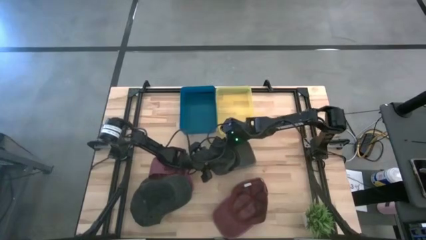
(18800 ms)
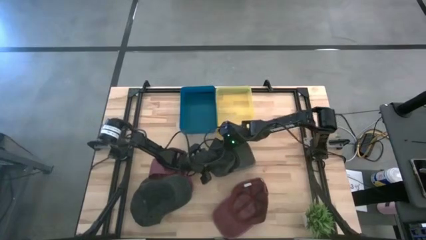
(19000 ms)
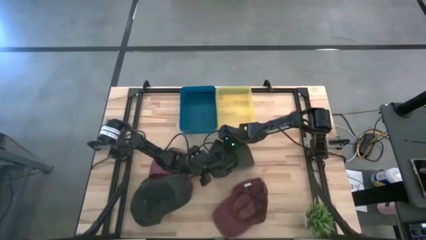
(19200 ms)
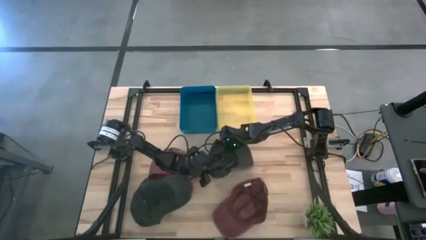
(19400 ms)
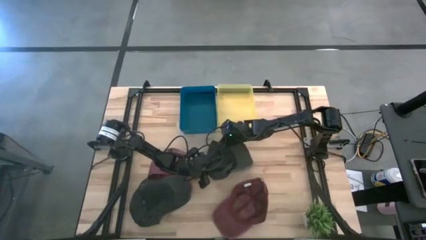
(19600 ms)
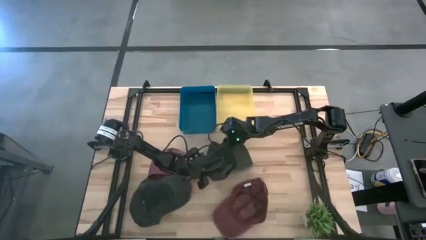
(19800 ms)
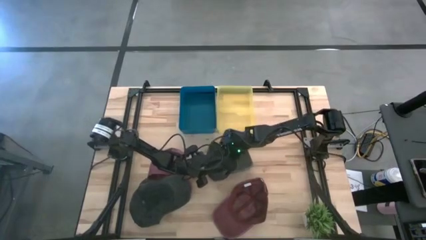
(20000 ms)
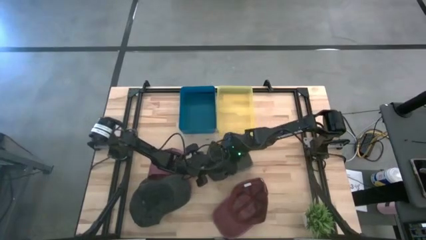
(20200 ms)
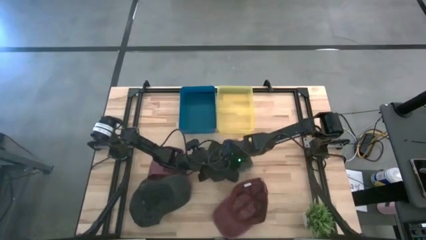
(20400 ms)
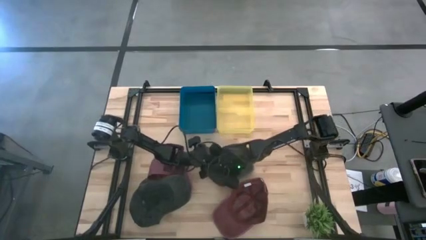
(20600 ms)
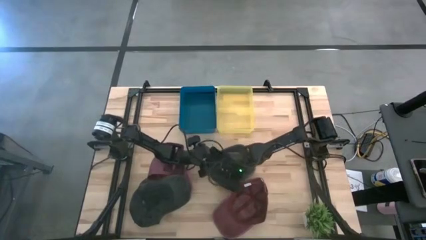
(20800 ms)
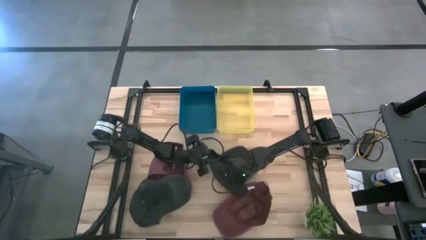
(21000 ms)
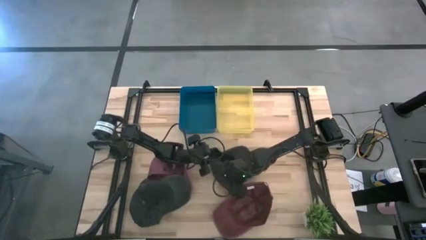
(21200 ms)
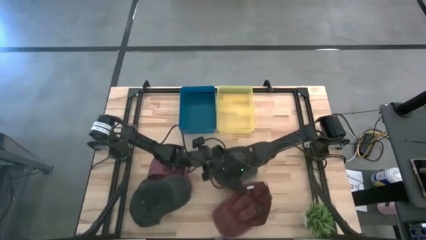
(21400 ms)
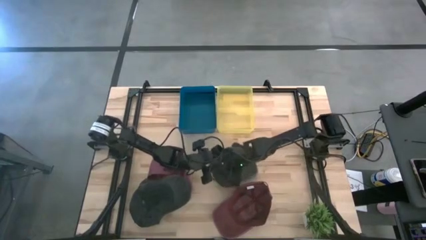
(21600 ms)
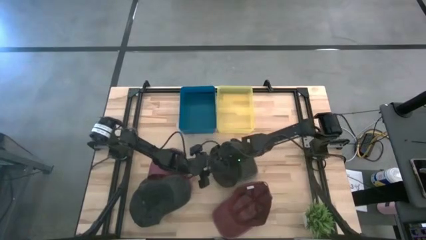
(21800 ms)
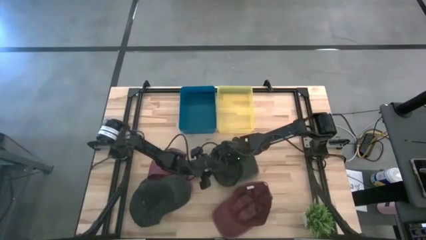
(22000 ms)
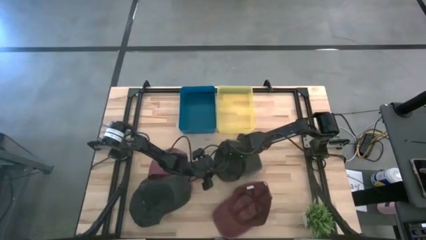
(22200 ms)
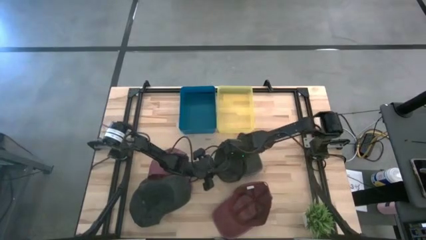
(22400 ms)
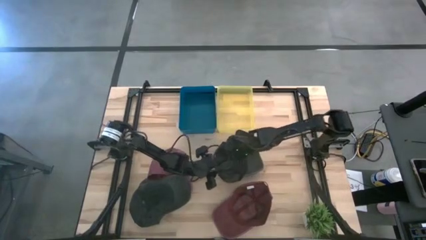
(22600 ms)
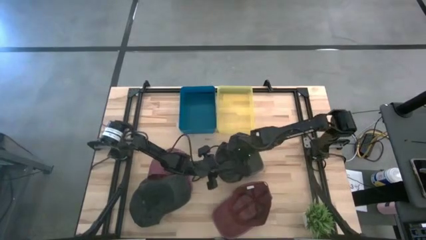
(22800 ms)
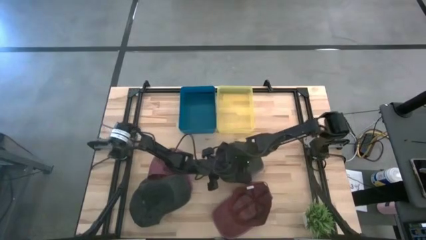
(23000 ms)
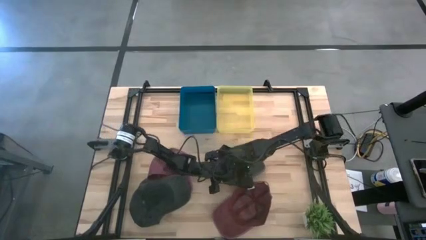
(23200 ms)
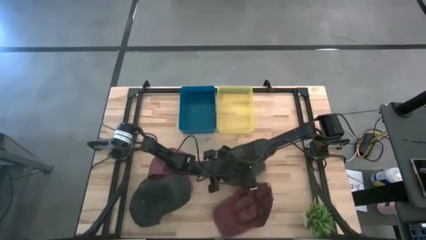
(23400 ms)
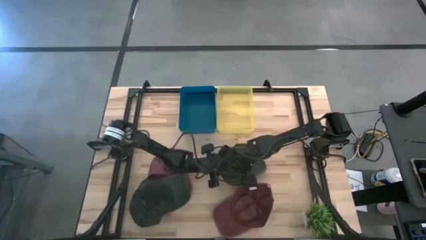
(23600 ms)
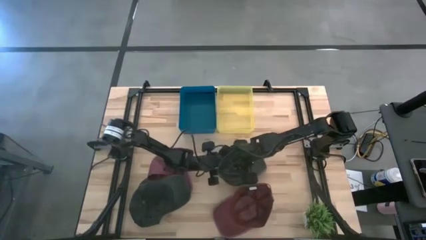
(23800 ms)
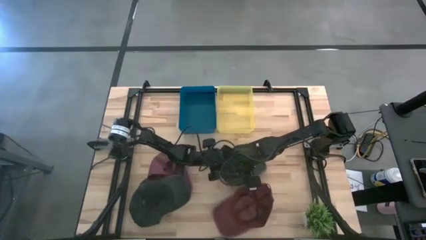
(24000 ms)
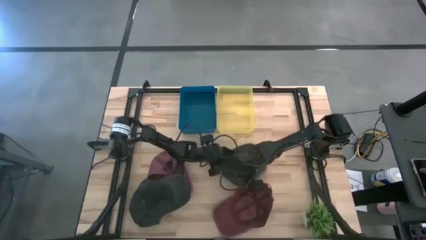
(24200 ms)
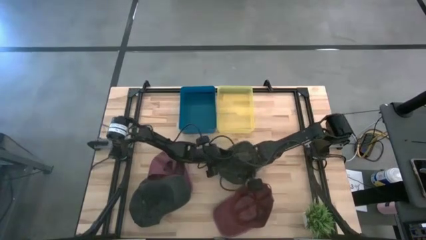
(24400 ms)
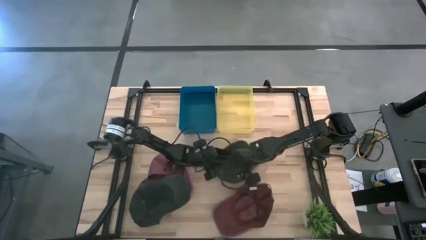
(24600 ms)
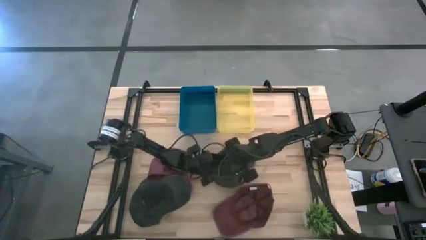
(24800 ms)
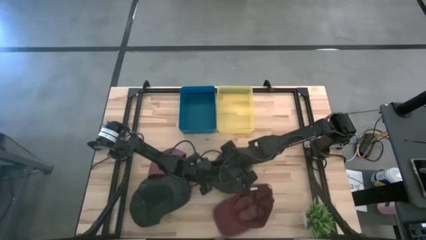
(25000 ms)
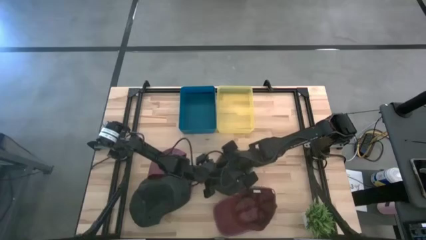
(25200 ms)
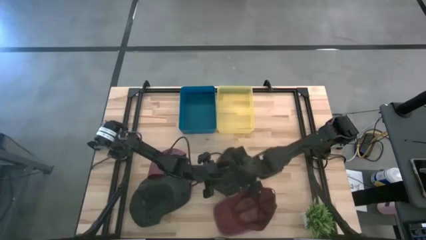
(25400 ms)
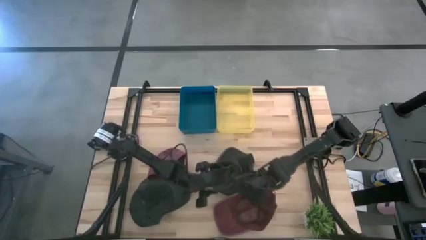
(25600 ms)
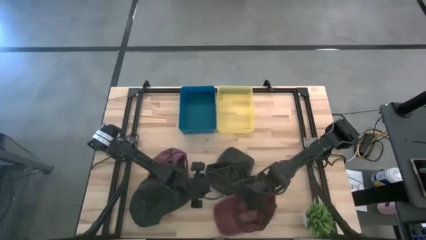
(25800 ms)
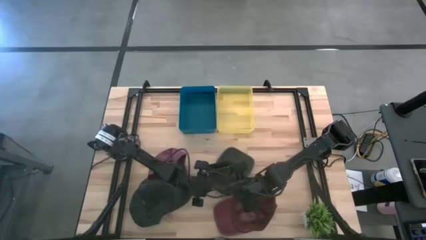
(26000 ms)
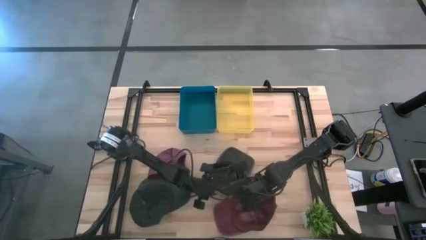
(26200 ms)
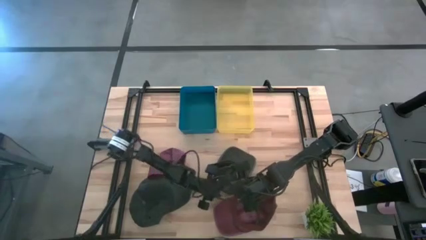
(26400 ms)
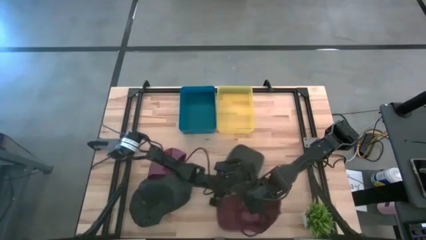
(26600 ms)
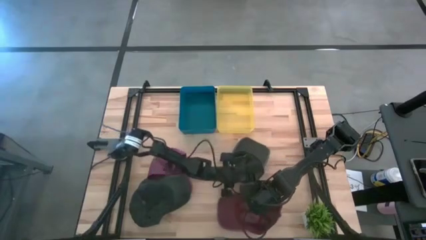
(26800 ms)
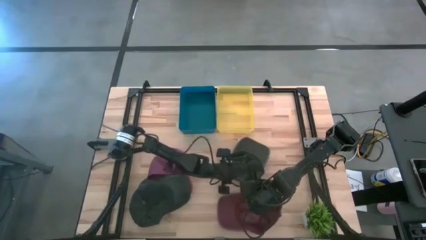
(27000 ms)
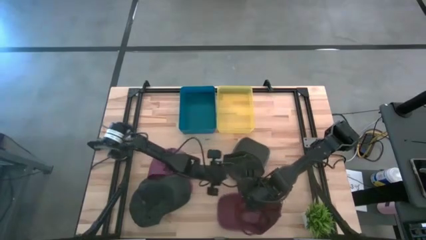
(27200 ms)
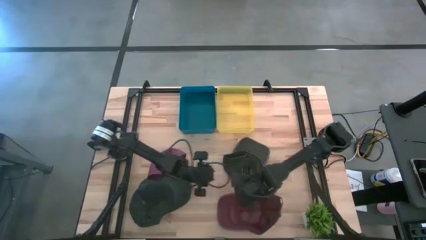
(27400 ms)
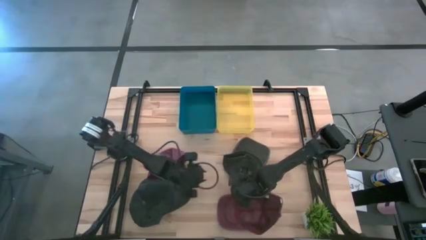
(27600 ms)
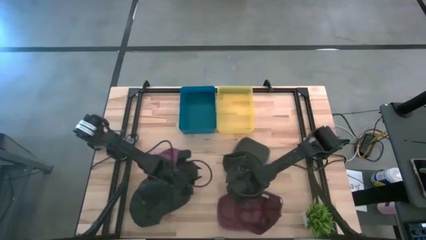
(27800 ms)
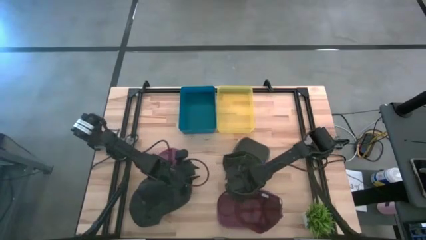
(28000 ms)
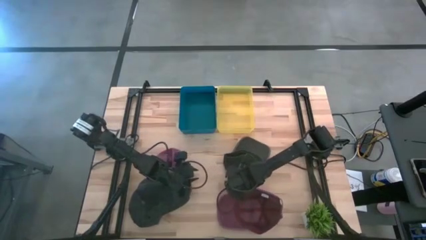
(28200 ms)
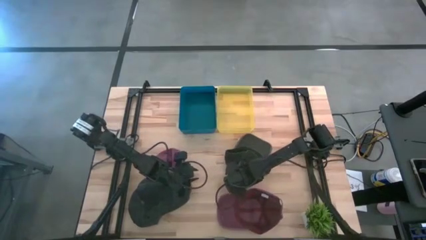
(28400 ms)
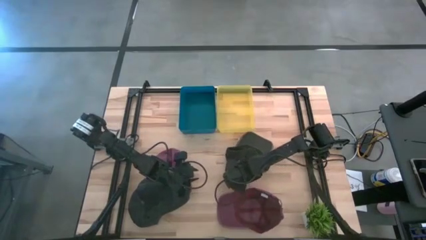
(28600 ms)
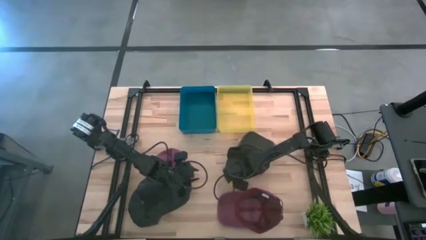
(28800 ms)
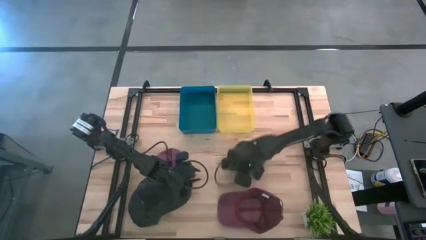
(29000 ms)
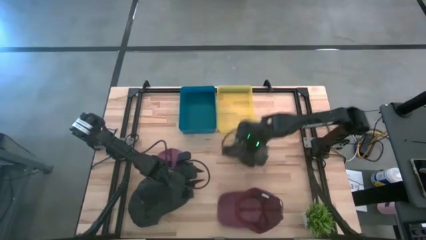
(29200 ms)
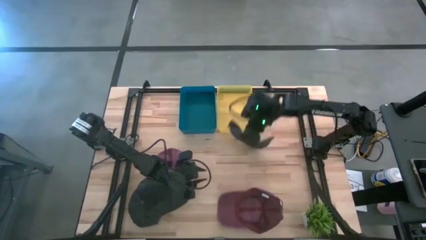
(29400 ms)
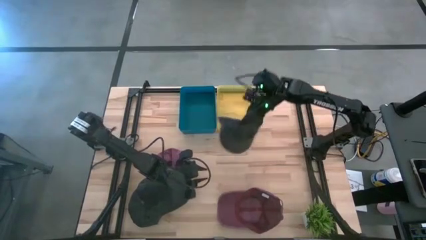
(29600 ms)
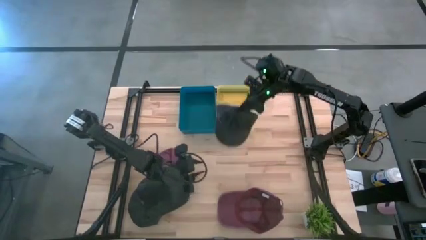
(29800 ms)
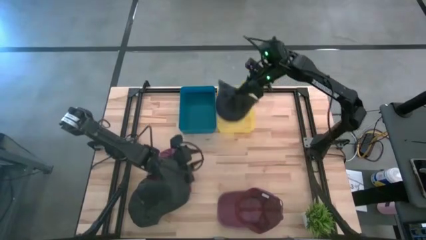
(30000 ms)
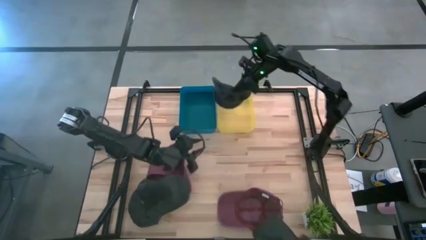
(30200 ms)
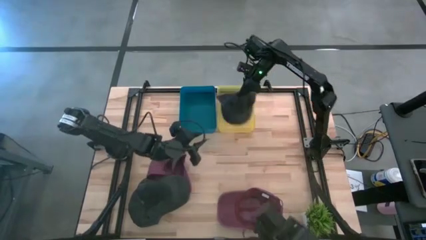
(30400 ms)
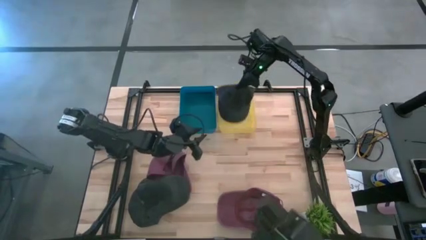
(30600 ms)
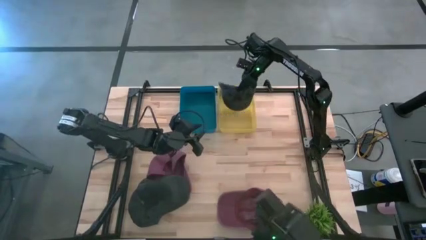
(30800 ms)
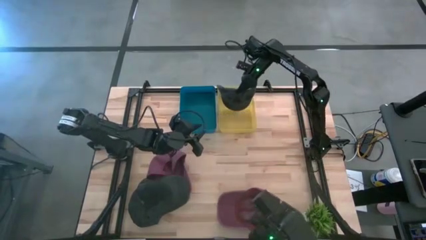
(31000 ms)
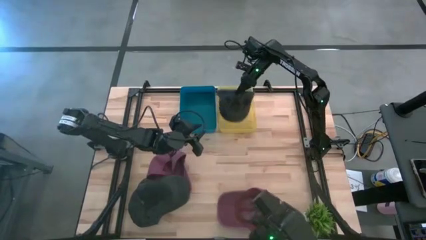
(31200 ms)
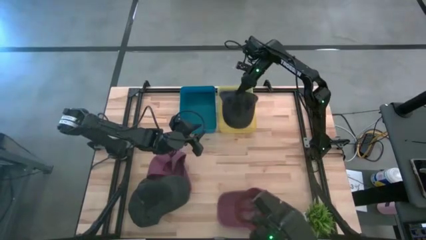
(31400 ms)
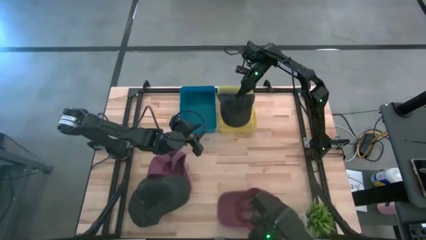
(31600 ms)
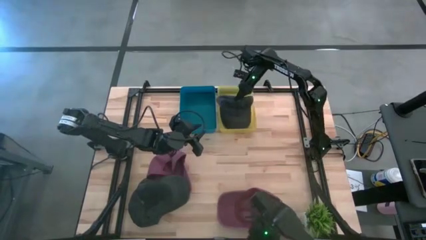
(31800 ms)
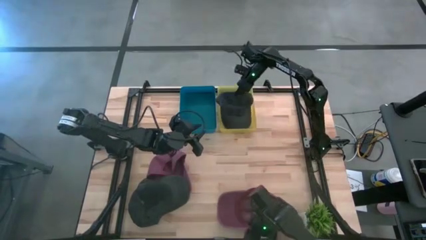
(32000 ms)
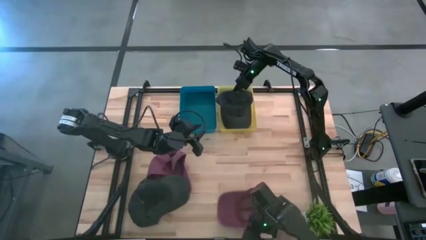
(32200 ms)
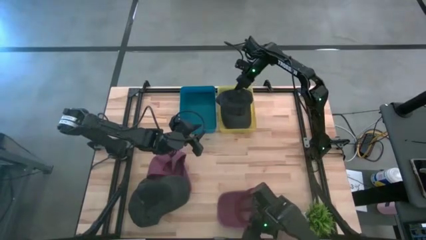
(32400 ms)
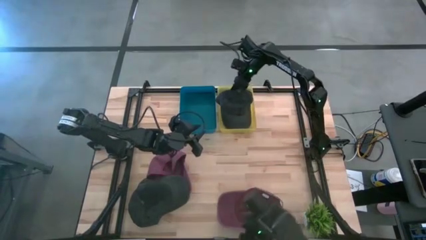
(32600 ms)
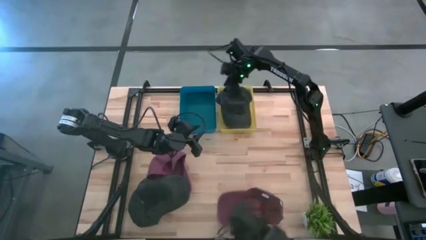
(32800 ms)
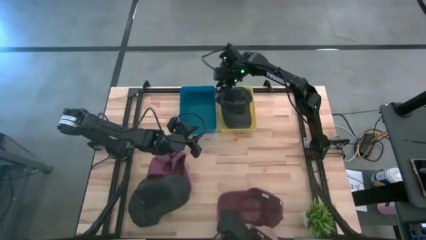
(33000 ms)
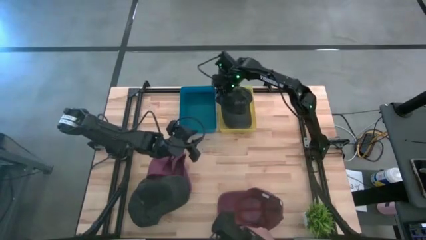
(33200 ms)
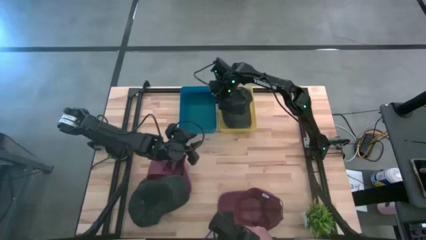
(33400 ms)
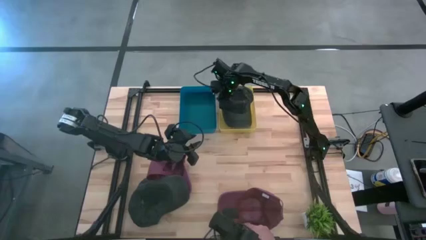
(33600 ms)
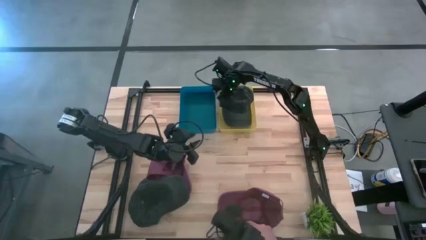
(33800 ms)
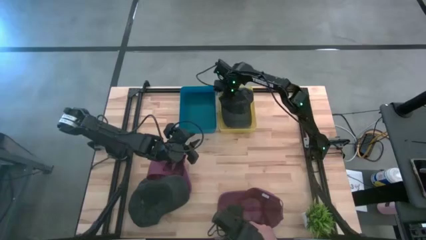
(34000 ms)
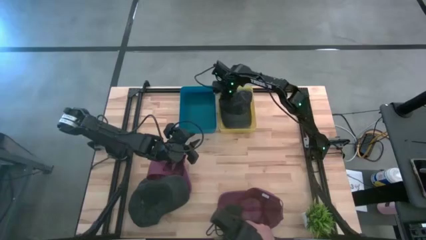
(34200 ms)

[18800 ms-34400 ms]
Task: Pick & Place hat
Put the black cap into the yellow bin
